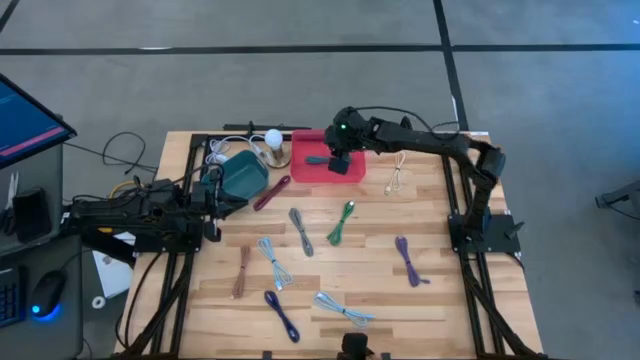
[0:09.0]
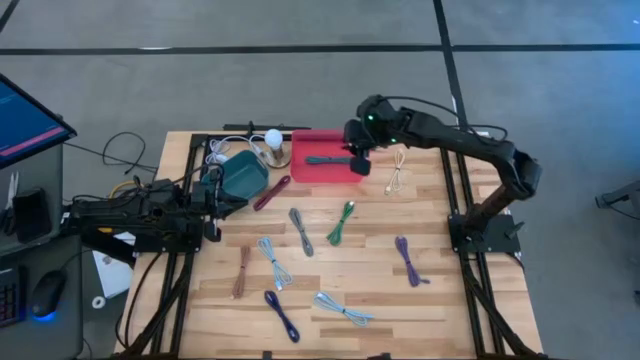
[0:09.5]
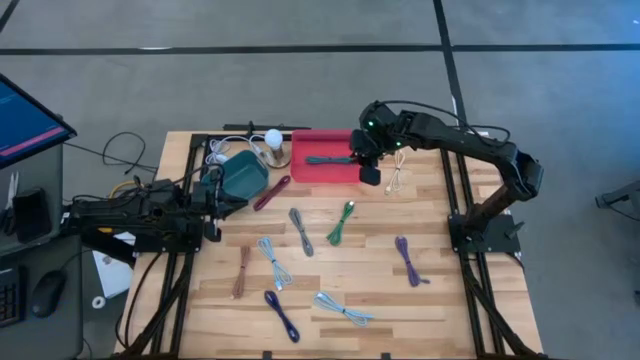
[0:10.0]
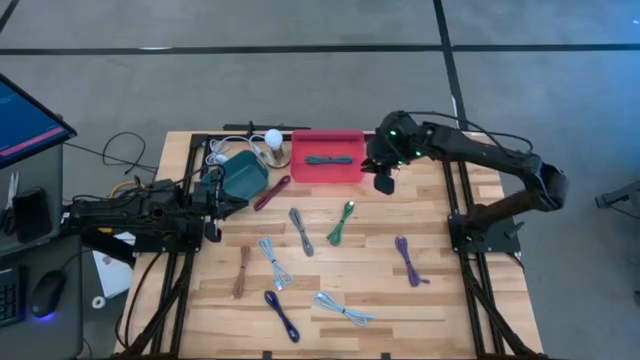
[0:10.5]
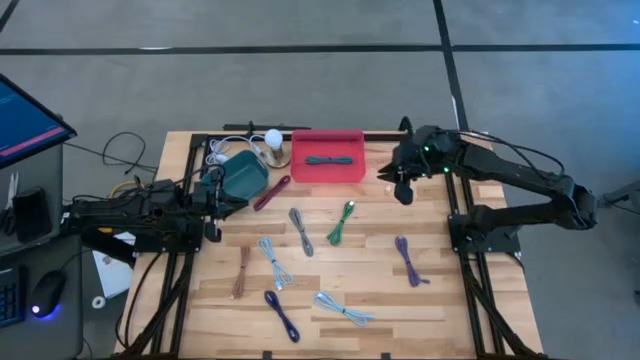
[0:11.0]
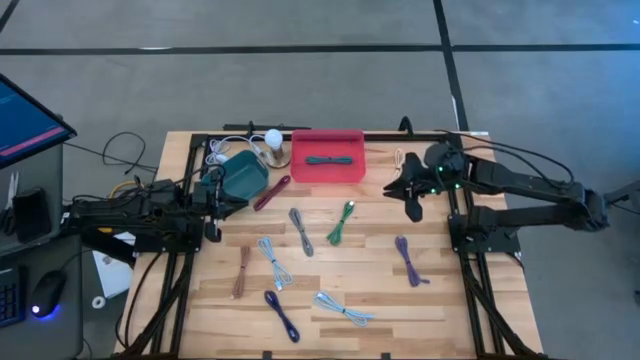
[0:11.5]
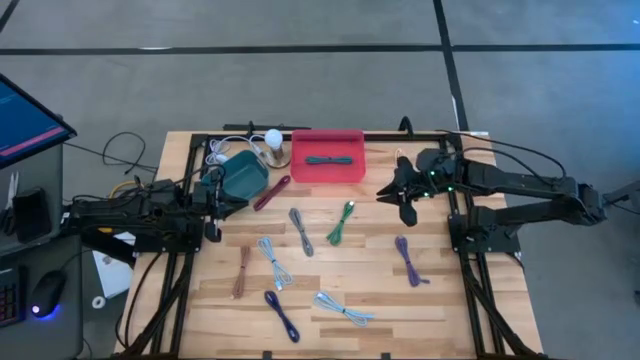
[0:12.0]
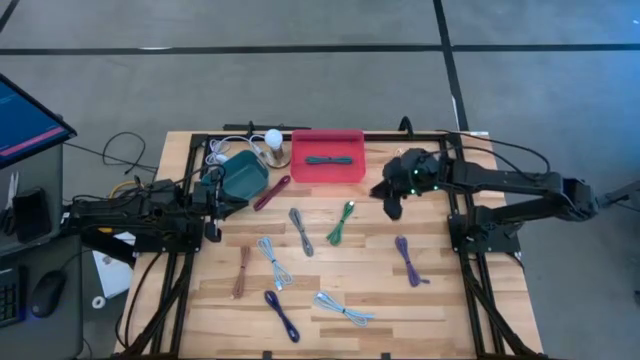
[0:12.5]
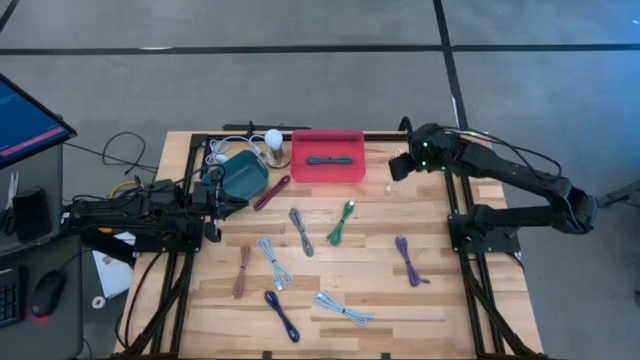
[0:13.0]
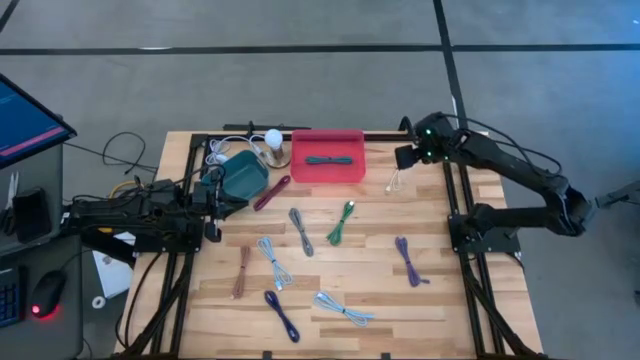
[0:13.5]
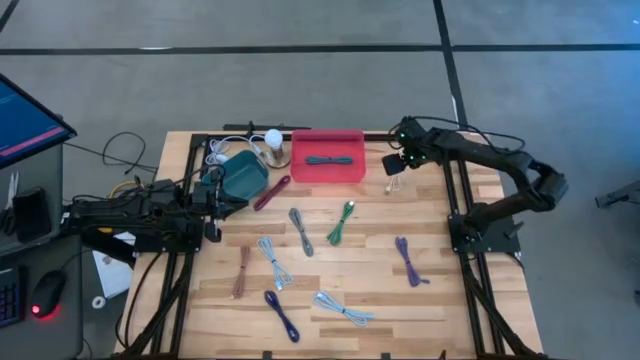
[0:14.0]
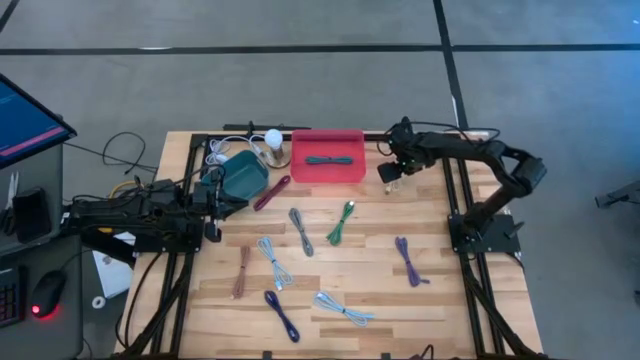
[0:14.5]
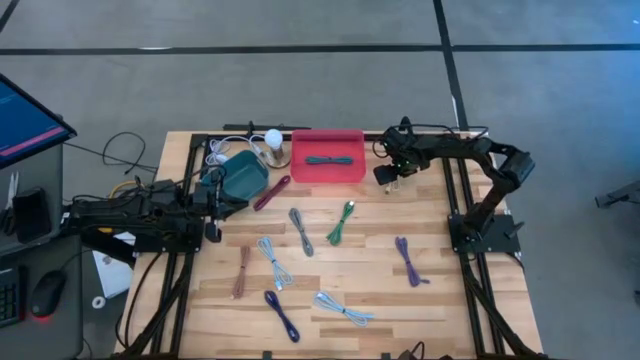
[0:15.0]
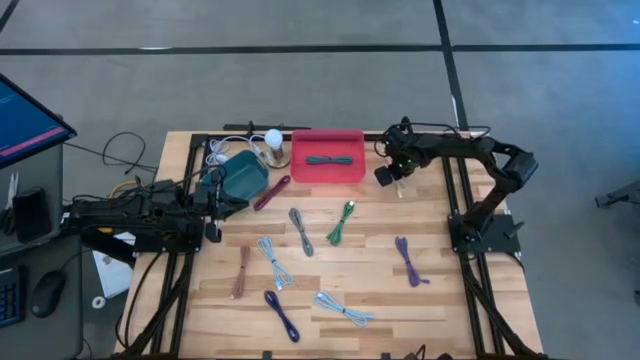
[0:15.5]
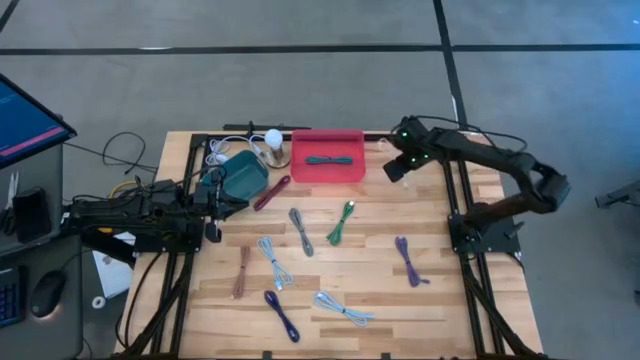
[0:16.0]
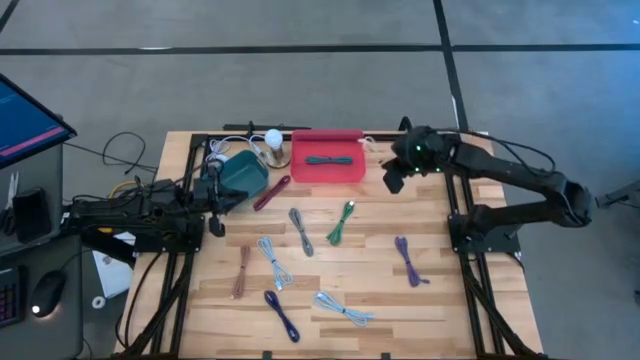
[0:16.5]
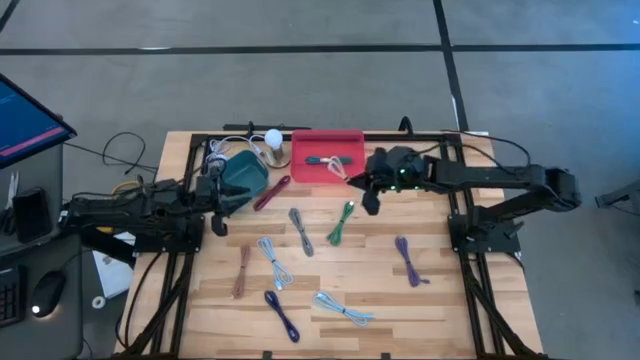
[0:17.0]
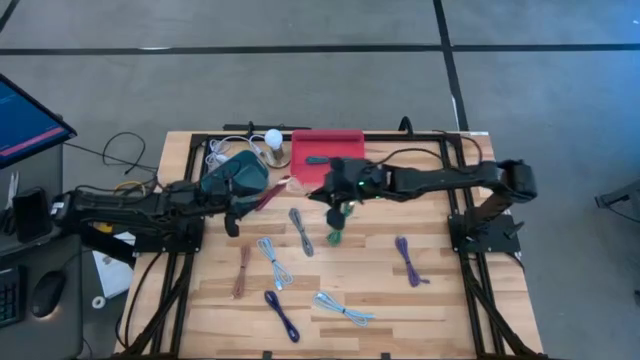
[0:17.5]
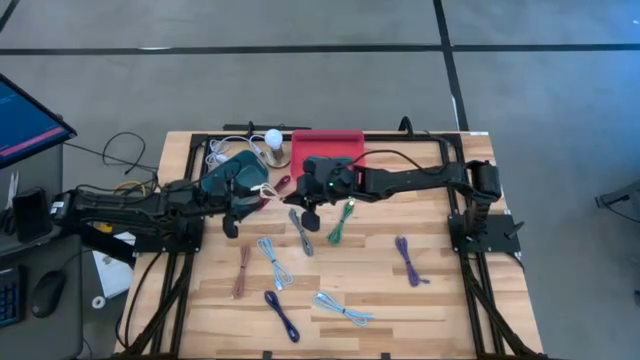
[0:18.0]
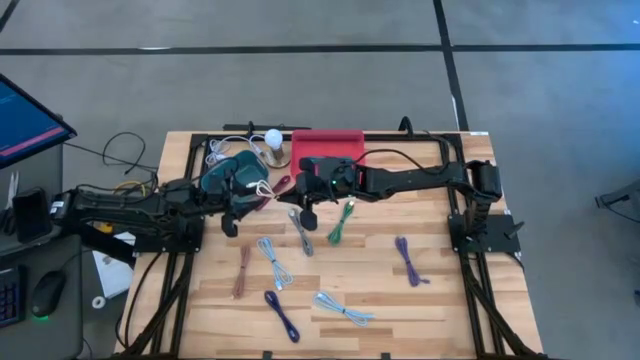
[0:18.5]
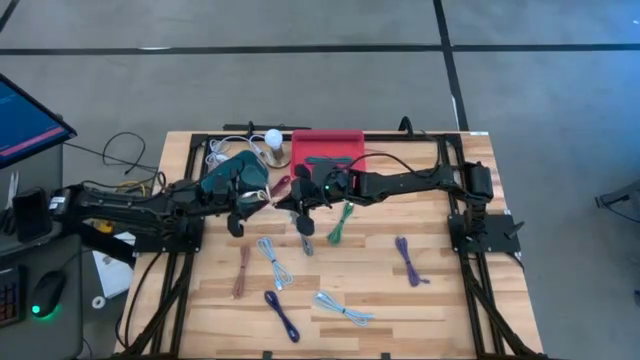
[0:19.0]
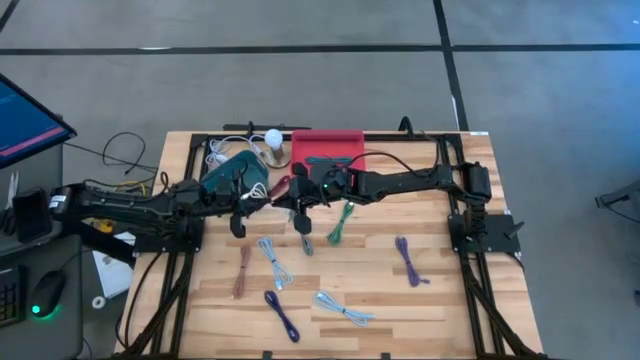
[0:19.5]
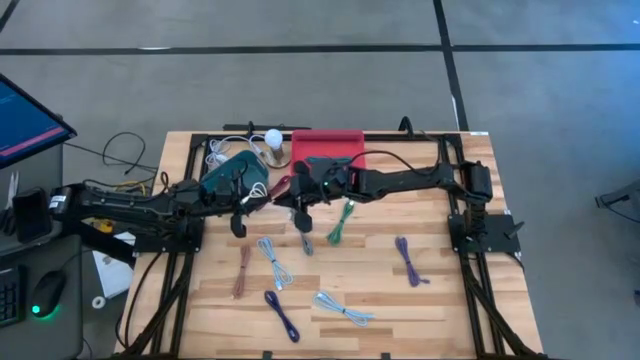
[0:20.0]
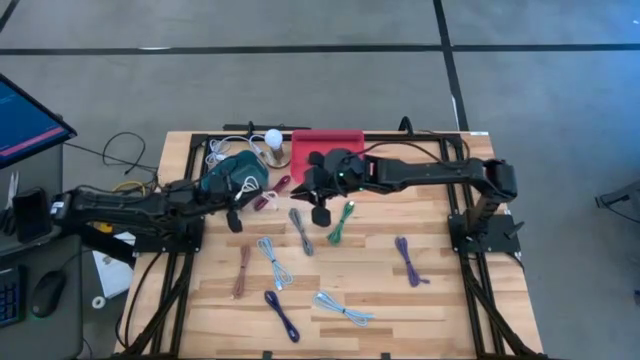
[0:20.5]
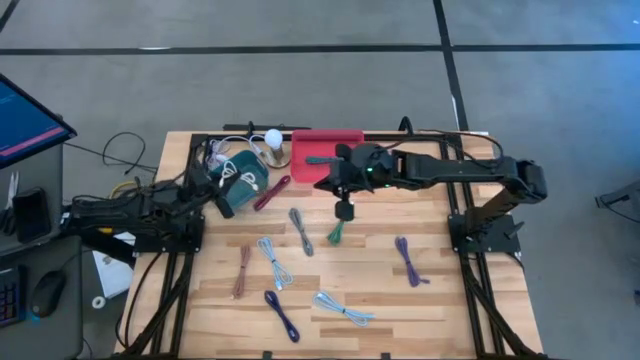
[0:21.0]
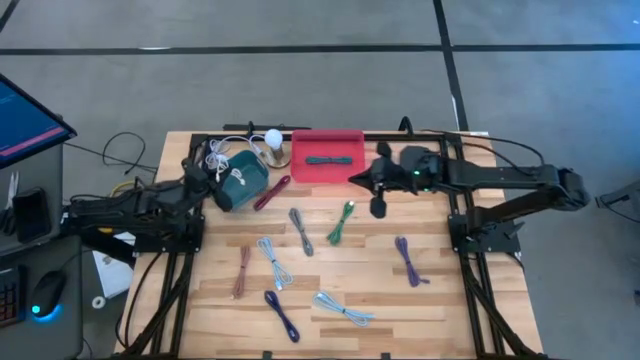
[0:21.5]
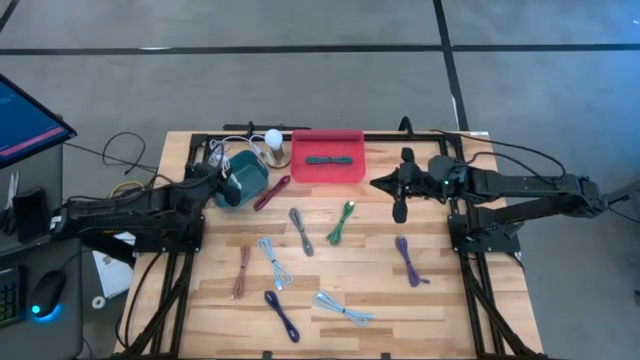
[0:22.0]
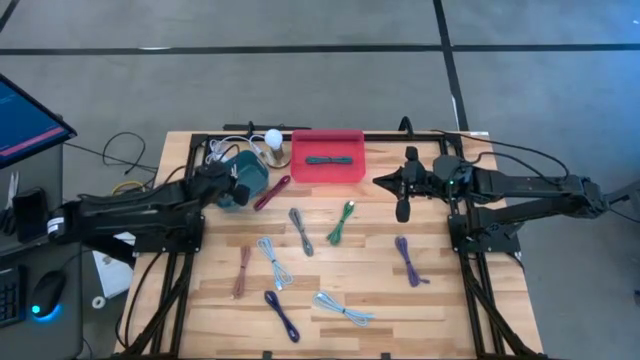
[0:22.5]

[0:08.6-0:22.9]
Task: Pick & Place USB Port
Put the white USB cable into the blue bin
